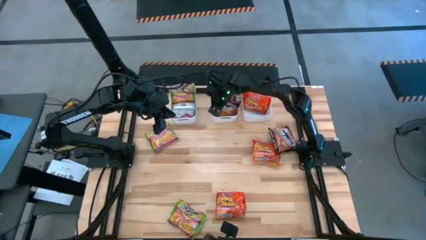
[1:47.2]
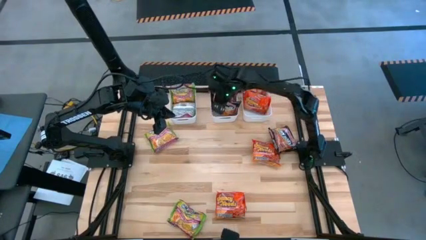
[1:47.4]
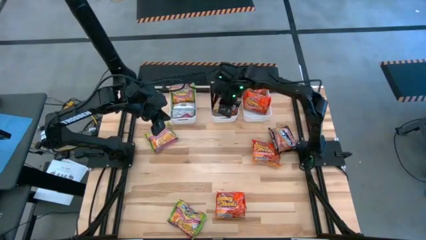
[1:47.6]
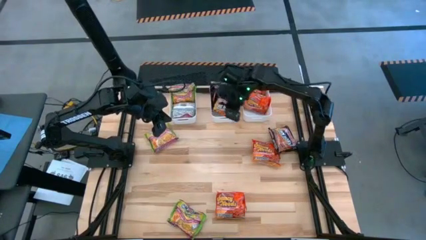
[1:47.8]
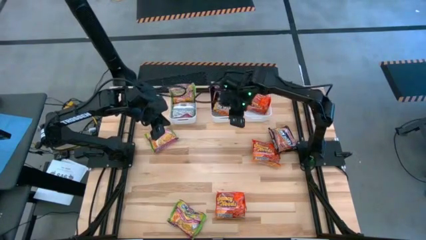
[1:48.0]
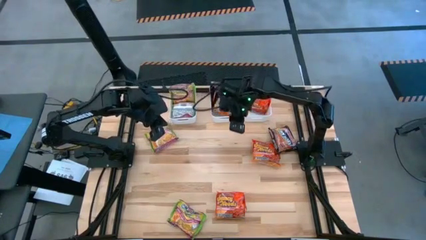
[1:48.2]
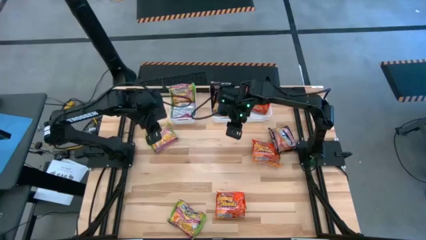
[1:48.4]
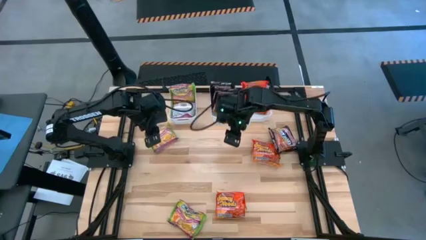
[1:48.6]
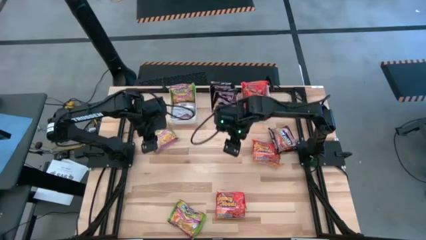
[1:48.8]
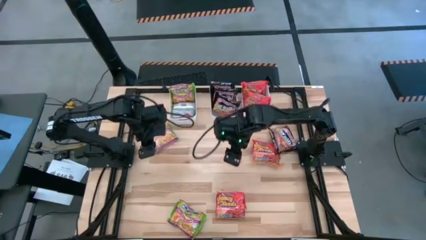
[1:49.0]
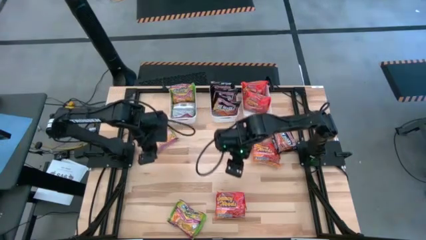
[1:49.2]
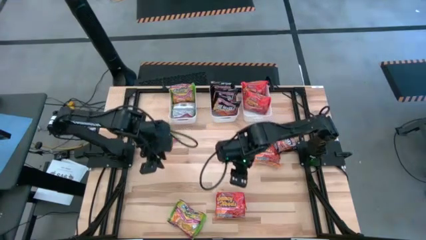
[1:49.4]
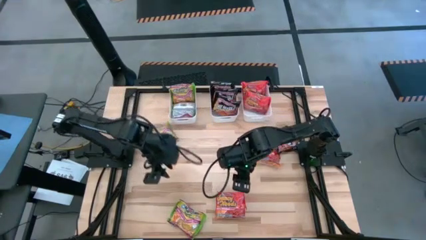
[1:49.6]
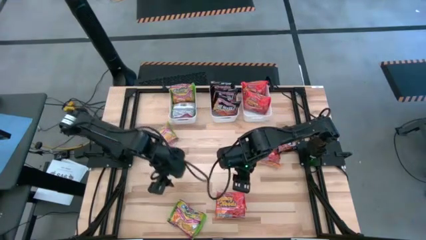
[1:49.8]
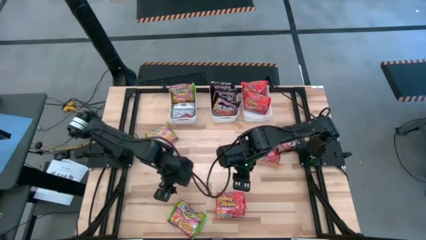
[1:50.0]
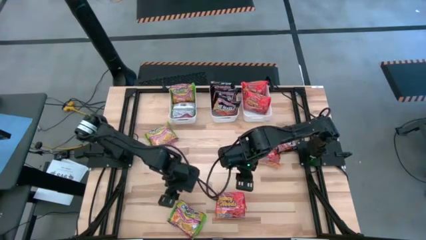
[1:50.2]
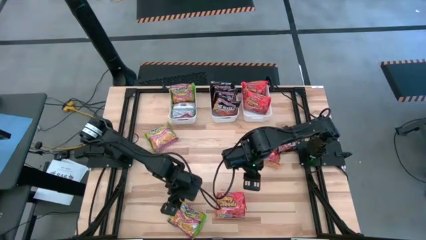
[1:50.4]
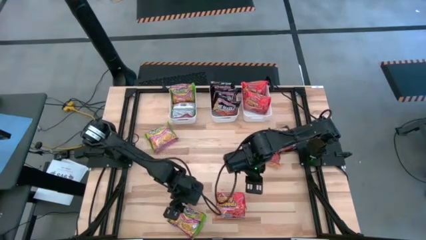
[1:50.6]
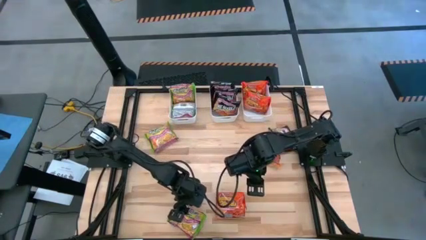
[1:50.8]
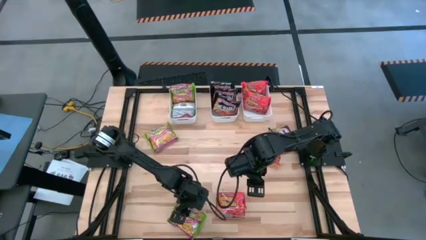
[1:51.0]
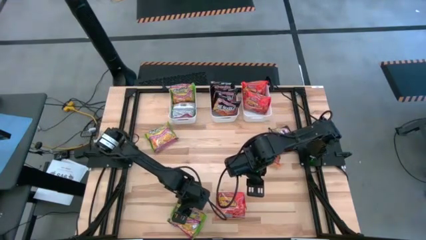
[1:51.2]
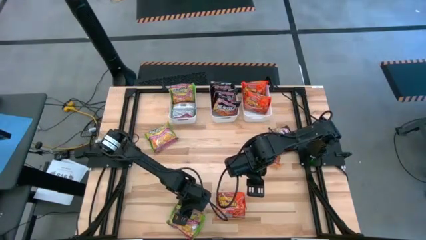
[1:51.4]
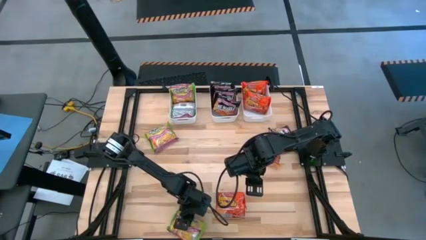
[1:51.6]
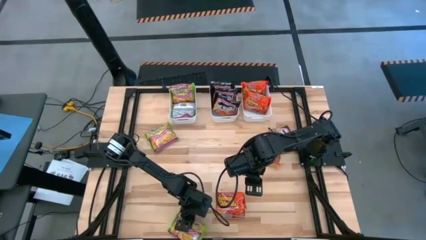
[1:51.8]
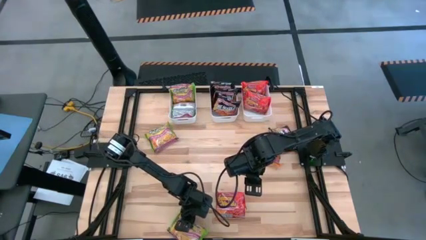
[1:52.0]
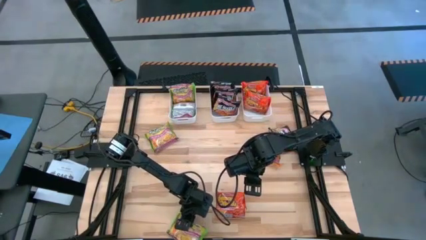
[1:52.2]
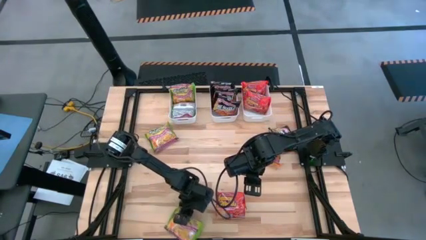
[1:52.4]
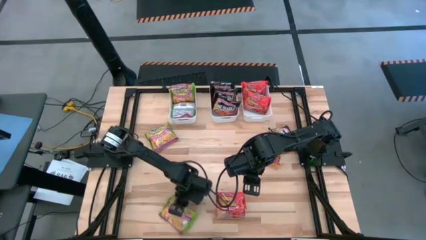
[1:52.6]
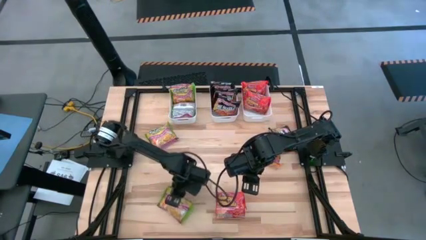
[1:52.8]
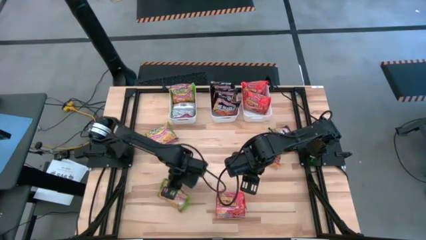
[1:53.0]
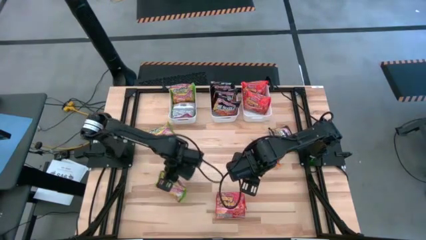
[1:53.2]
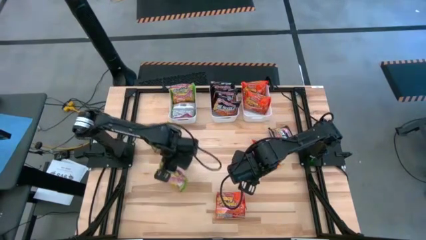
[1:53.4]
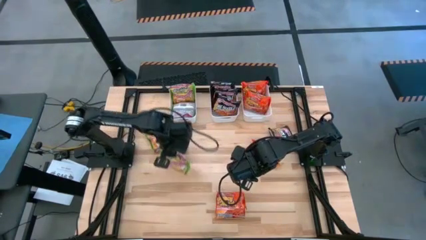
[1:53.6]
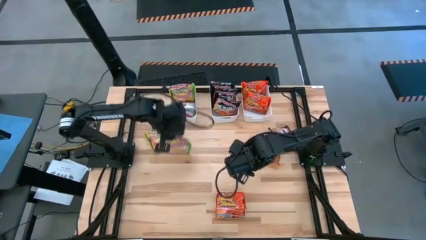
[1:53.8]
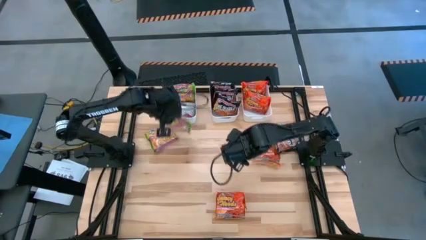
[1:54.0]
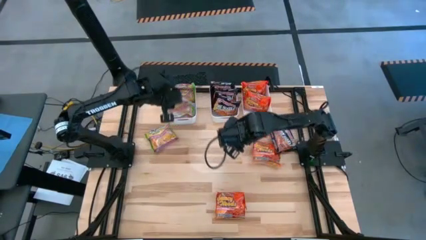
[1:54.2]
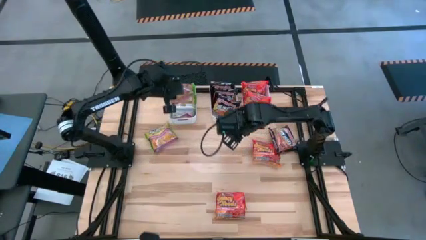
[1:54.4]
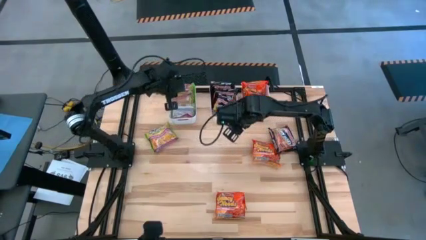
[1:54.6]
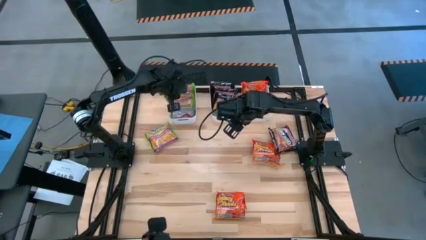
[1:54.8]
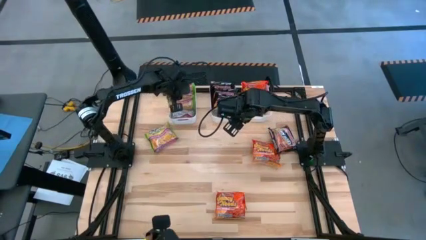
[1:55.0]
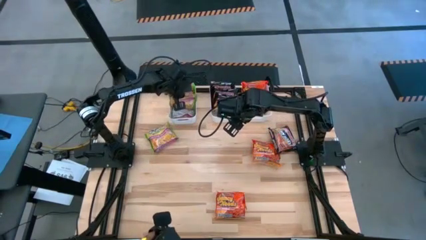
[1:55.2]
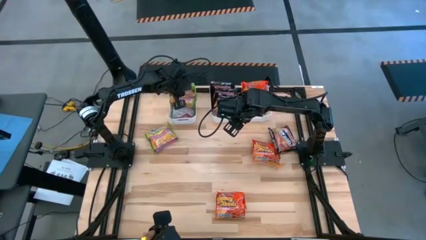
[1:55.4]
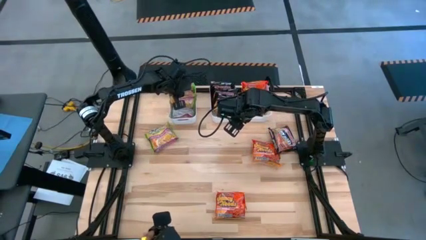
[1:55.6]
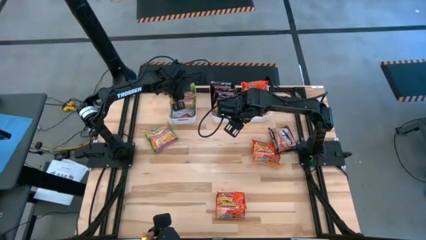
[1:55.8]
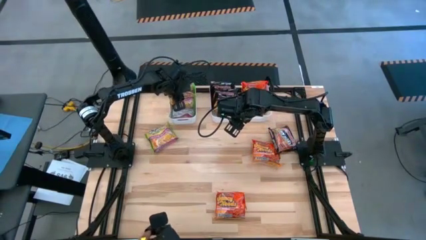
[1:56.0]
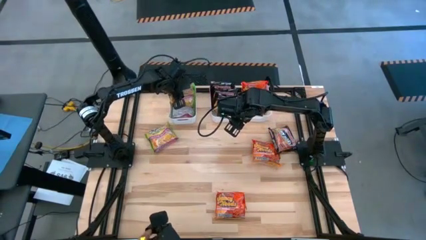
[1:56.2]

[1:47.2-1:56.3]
Task: Sort Maruchan noodles
Put the green noodle pack into the left white bin

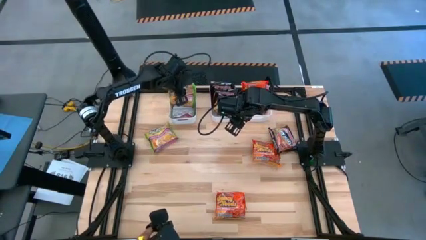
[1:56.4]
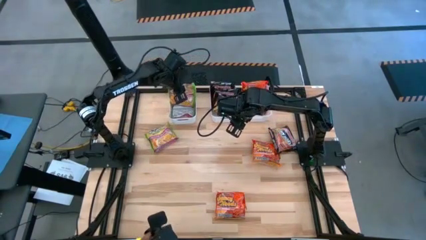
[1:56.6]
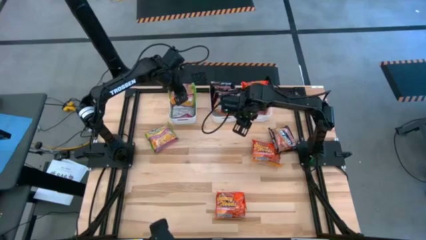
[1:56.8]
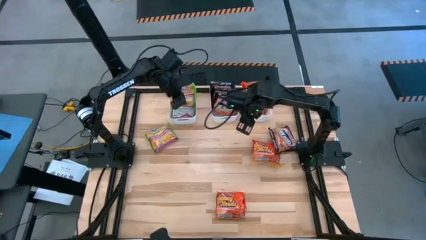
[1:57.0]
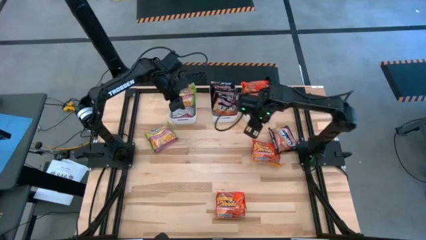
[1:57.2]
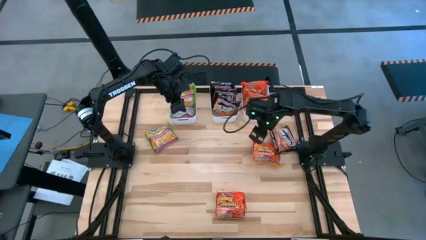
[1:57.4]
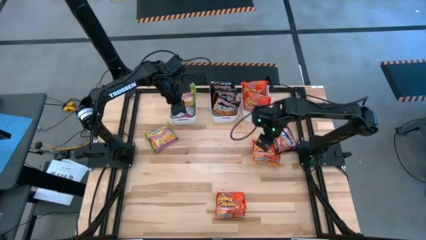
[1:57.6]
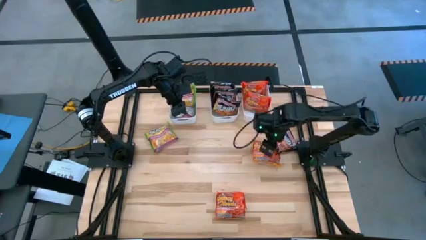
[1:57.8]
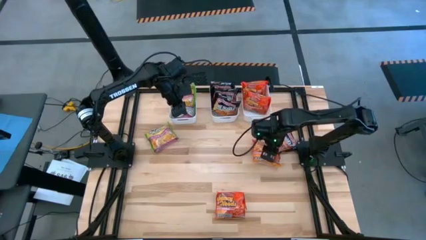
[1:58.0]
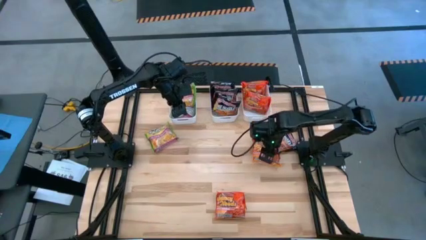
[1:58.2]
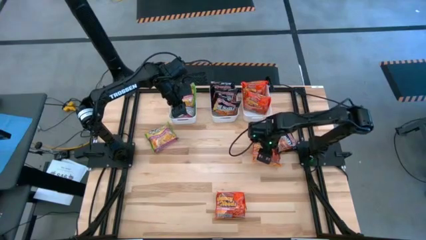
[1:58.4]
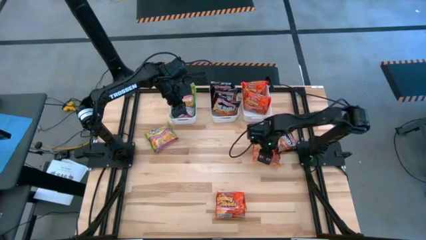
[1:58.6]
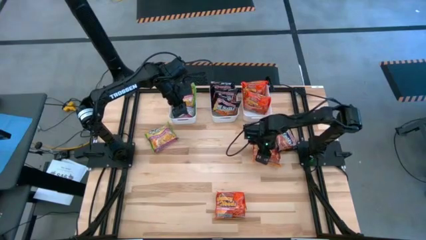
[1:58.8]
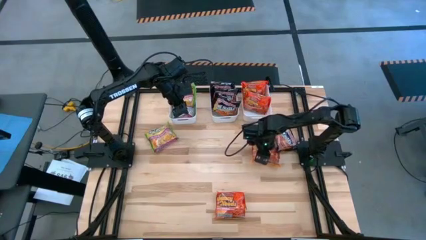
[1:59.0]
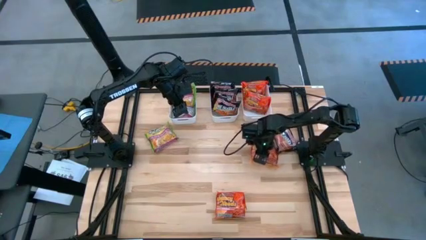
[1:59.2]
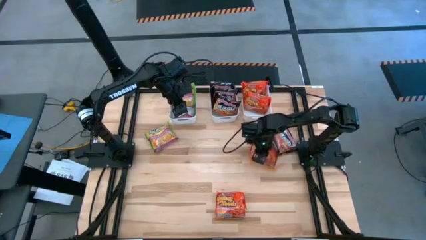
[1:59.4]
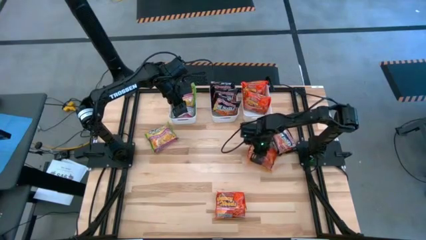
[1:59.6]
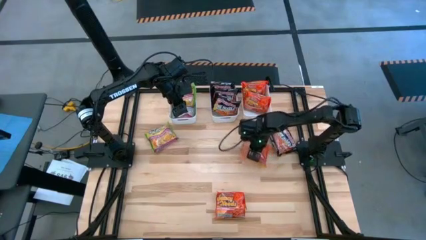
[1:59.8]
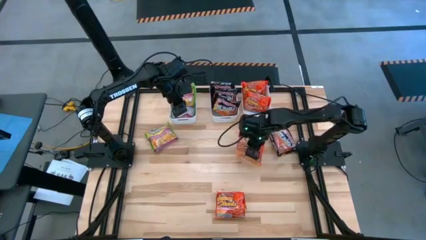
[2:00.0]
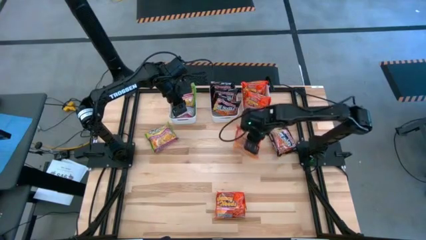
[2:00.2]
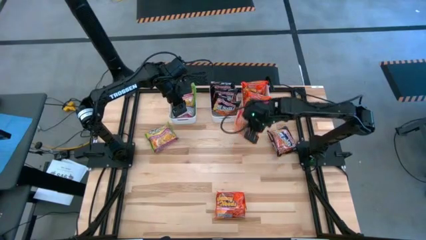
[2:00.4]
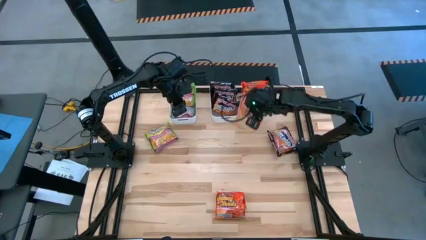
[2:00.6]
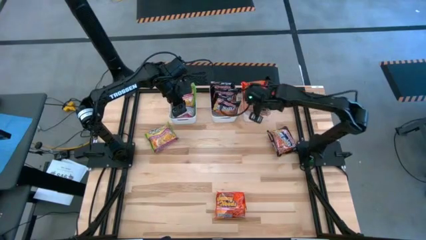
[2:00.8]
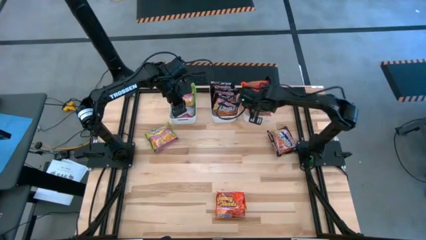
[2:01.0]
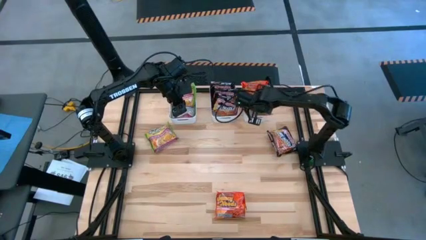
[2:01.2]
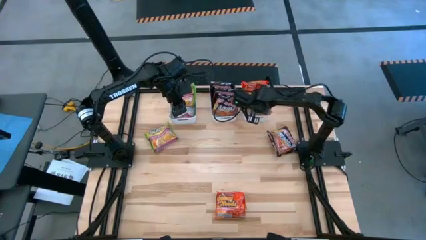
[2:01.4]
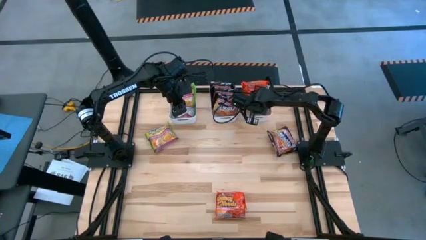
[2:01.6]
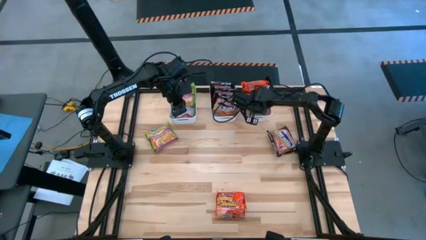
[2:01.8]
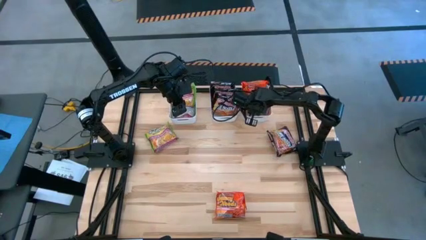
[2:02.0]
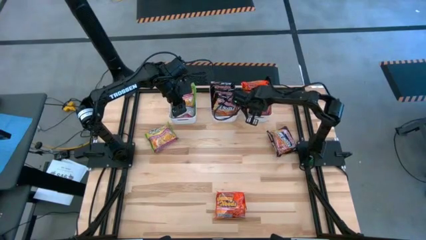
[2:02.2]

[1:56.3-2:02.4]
Put the orange noodle pack into the right white bin

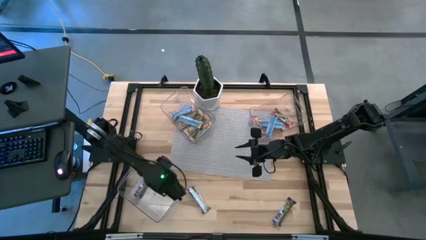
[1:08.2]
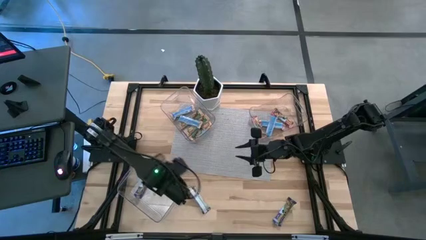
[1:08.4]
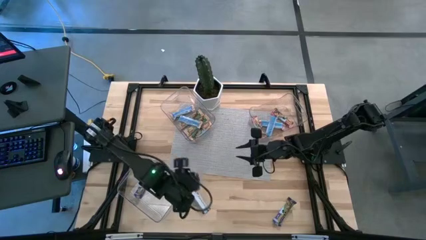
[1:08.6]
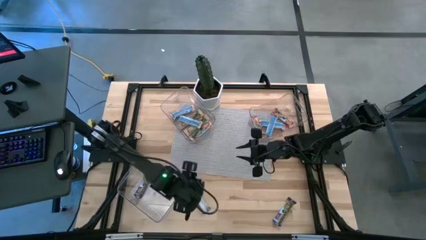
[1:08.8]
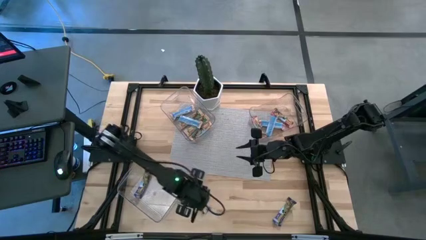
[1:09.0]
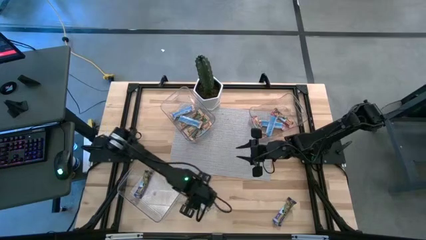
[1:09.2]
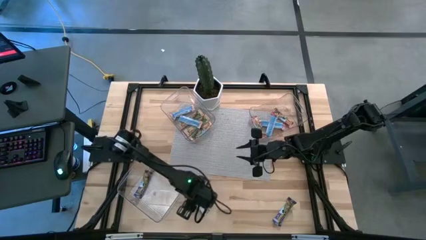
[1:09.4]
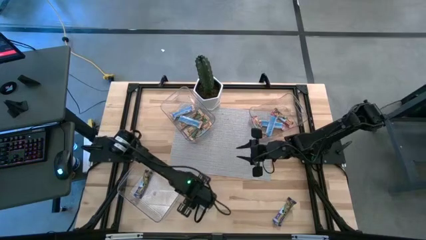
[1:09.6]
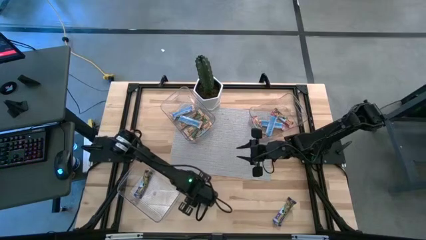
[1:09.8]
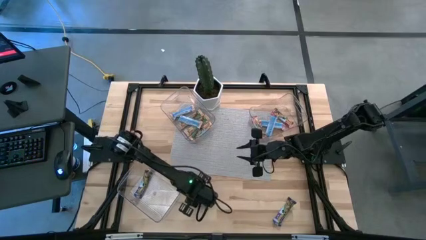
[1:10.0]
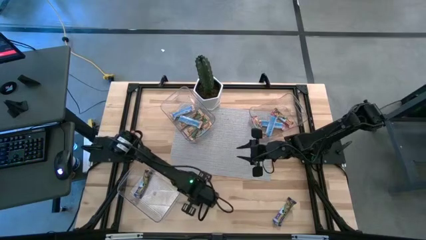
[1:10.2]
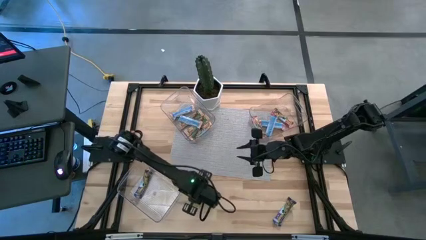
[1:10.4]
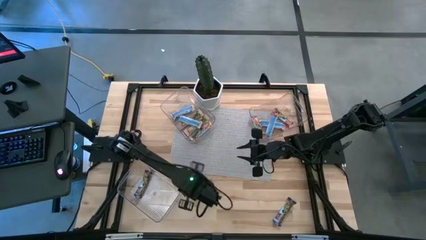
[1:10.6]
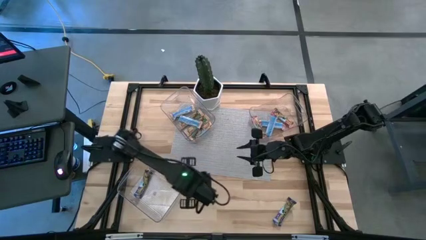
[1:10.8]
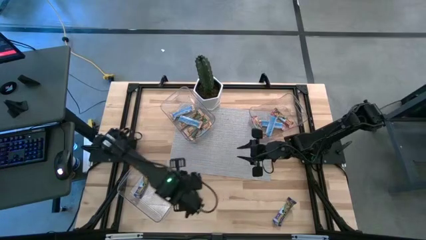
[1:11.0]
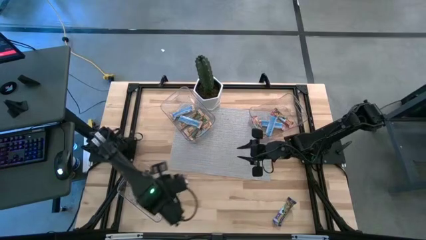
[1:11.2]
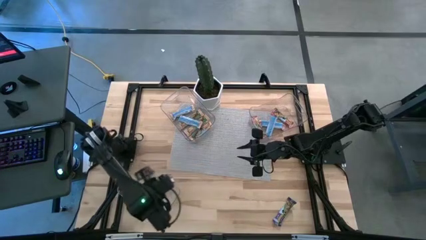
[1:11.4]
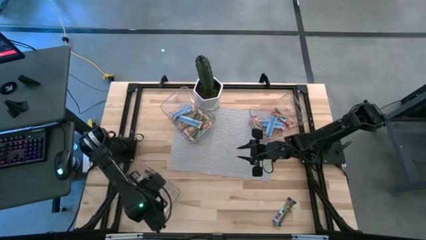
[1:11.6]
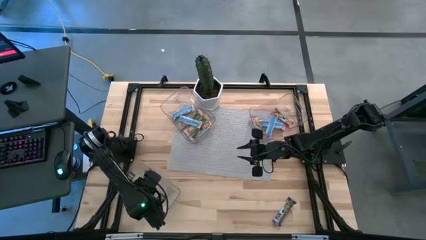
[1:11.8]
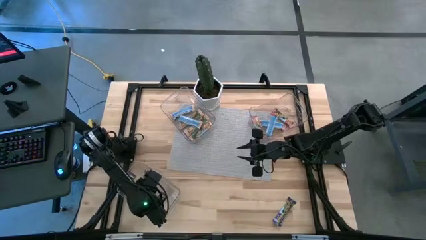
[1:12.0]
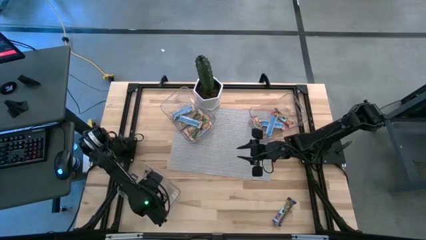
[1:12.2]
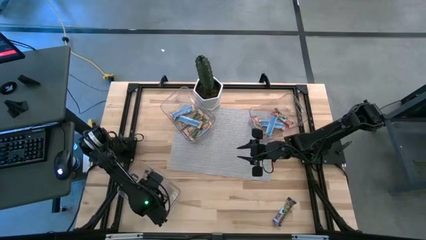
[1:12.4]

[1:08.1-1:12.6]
Task: Pick and place Granola Bars by type
Put the blue granola bar into the bottom transparent bin
